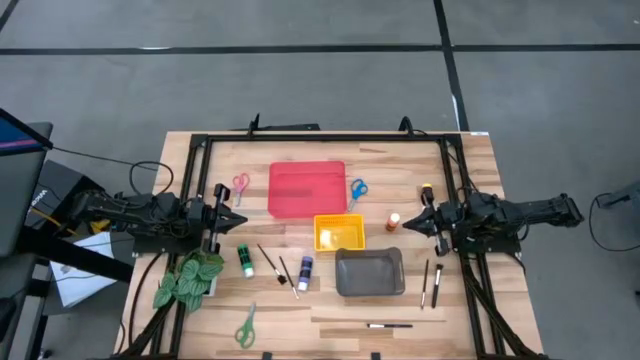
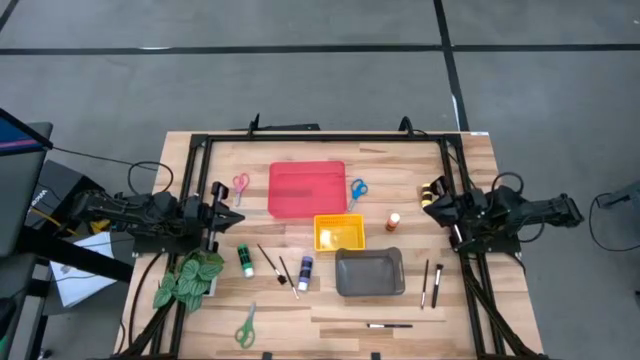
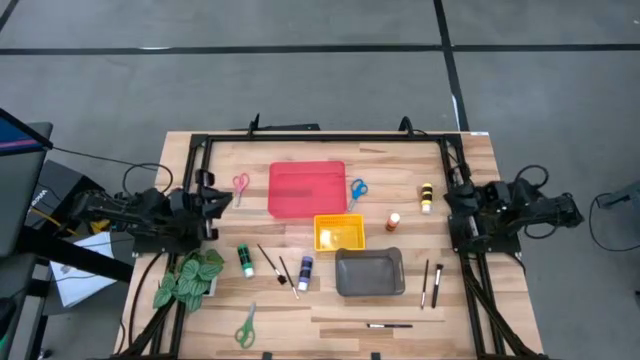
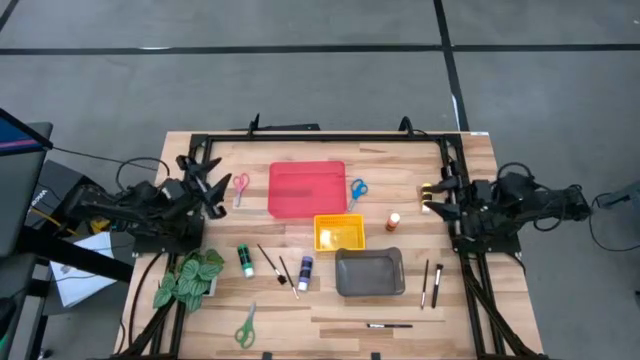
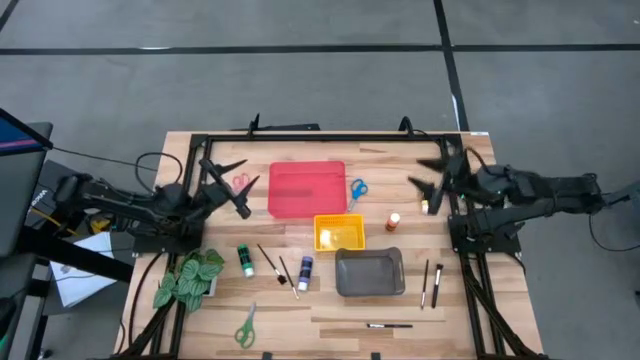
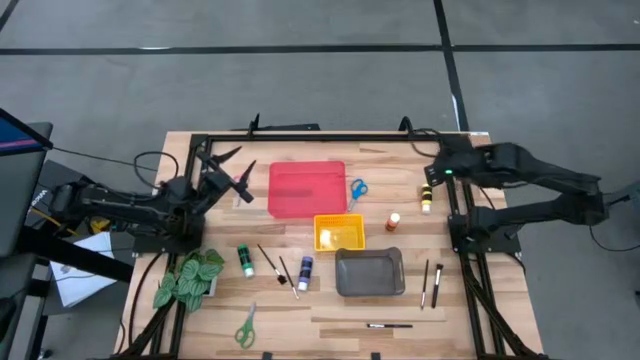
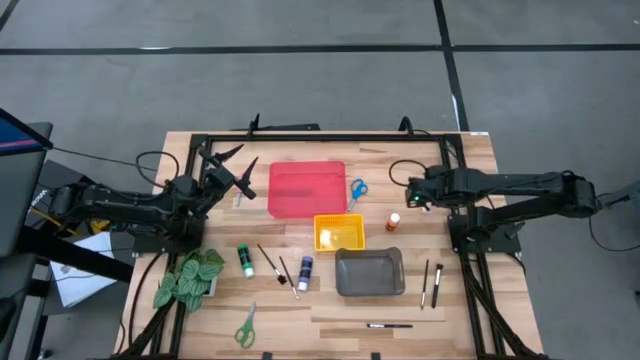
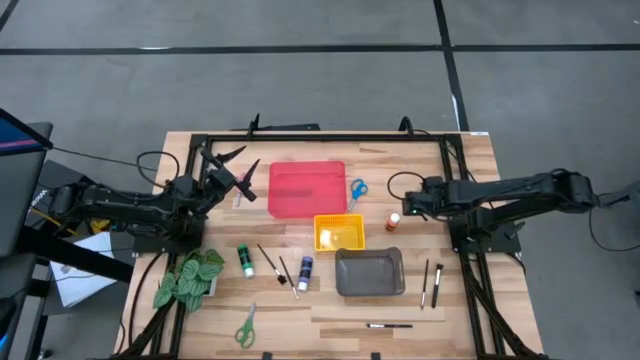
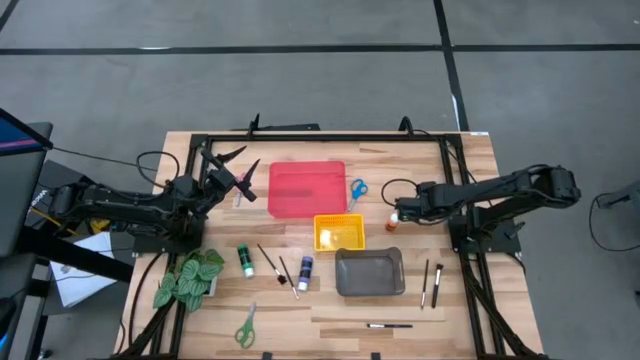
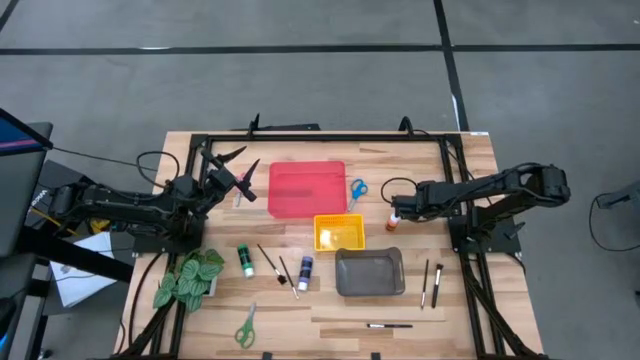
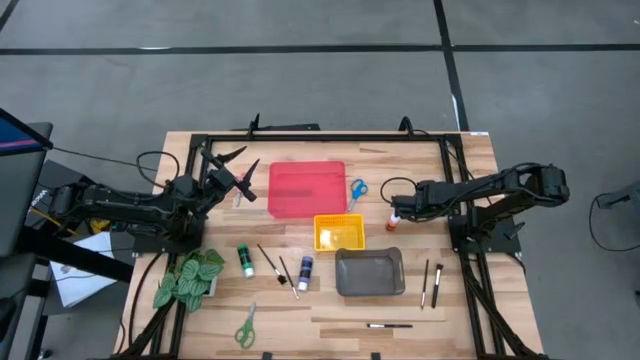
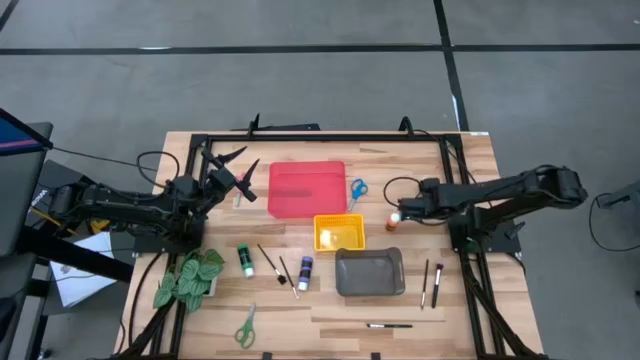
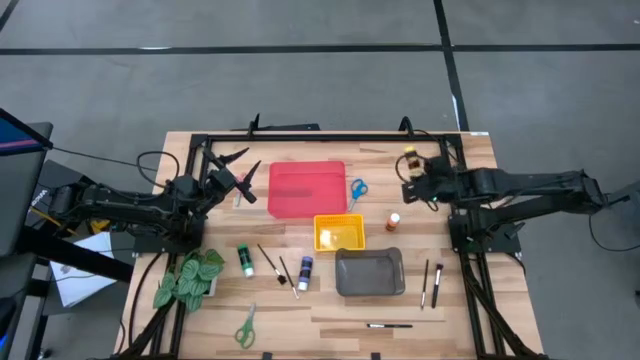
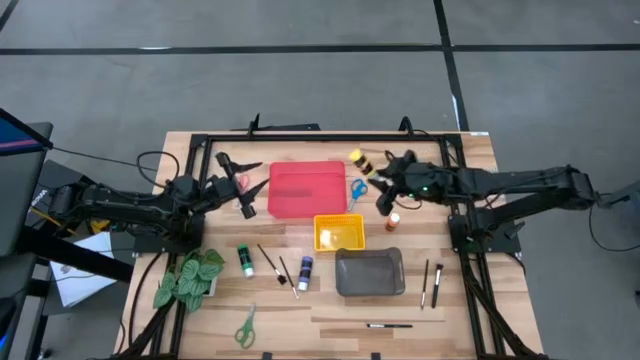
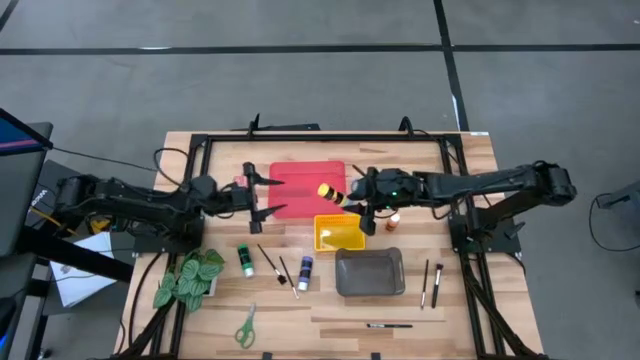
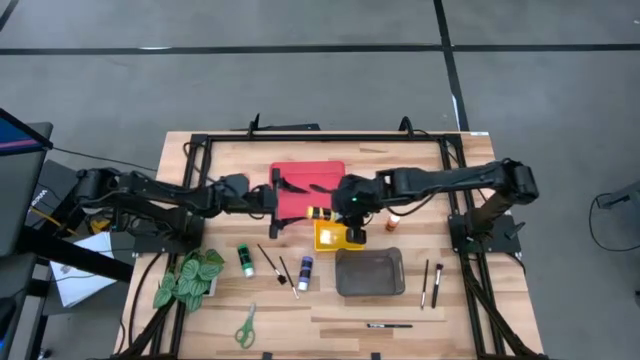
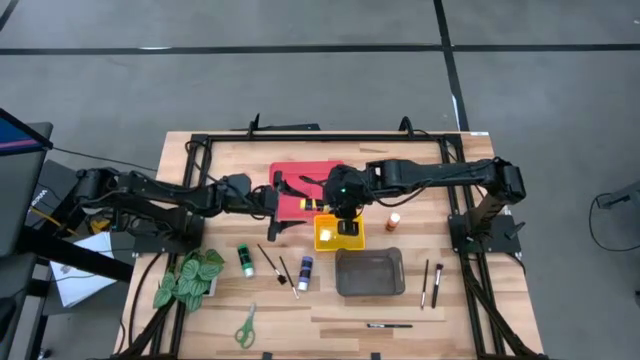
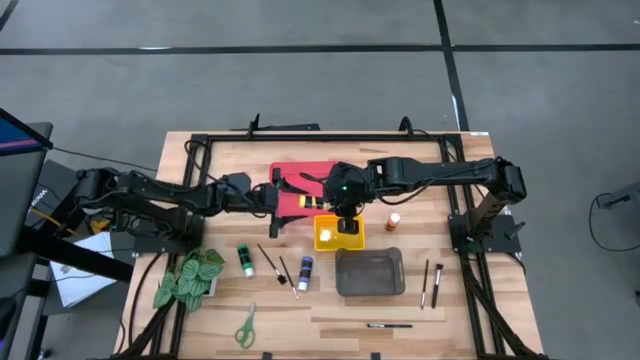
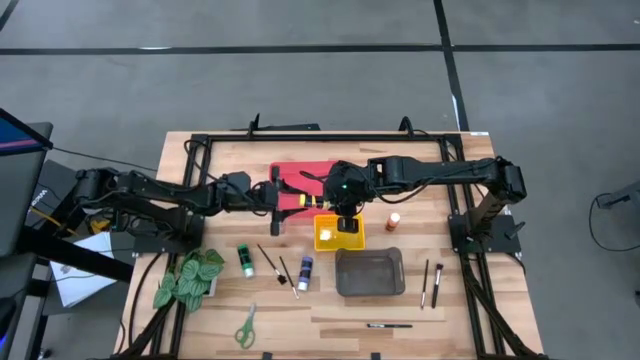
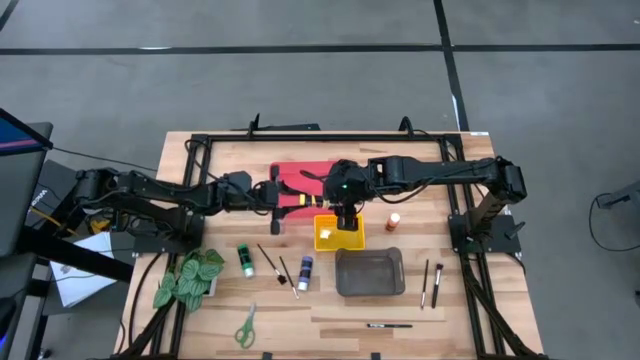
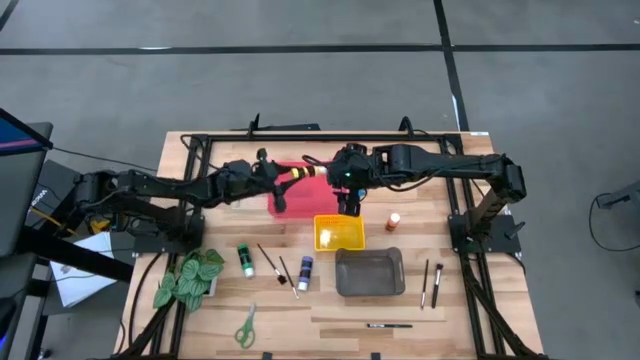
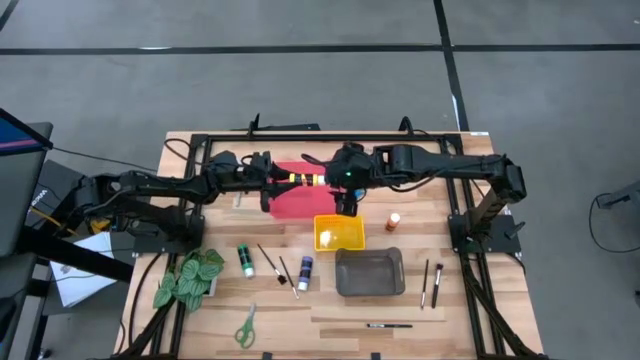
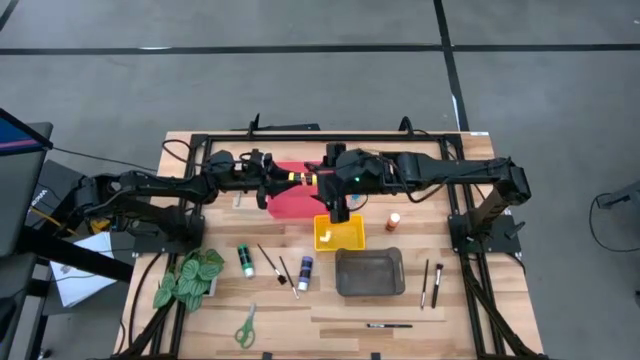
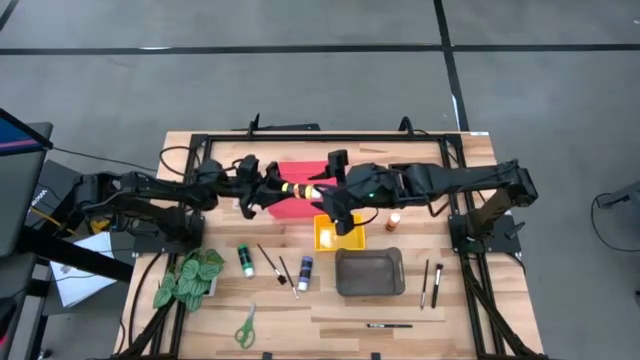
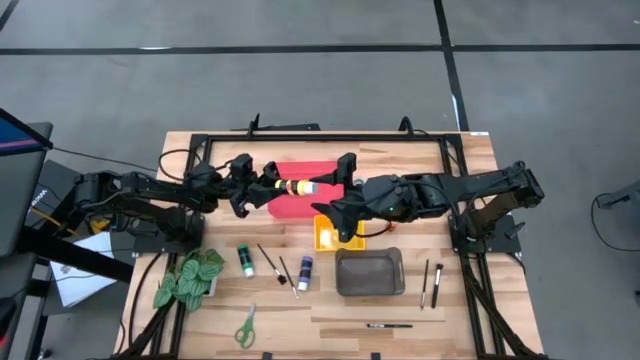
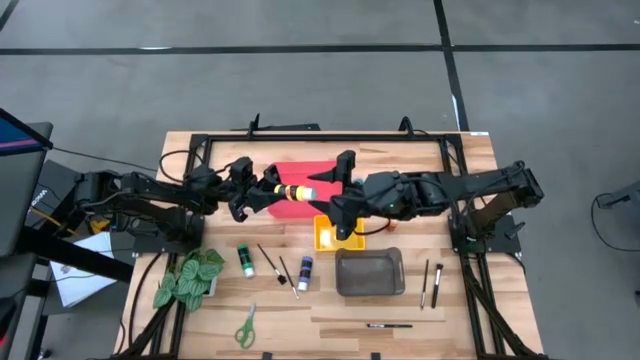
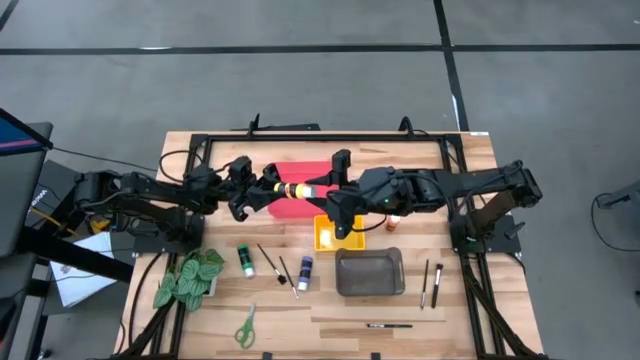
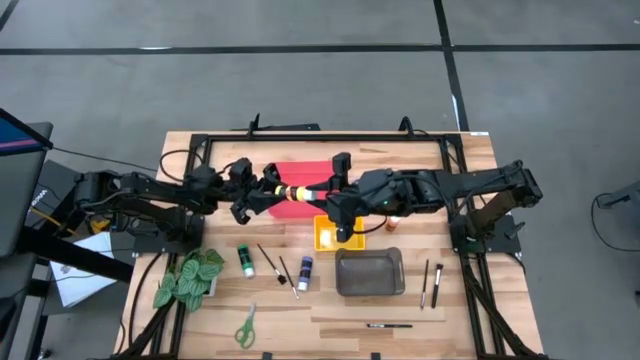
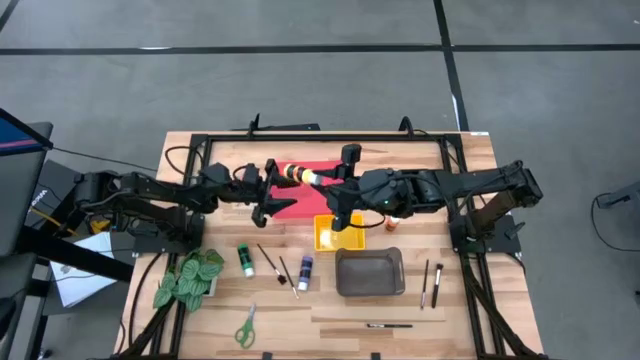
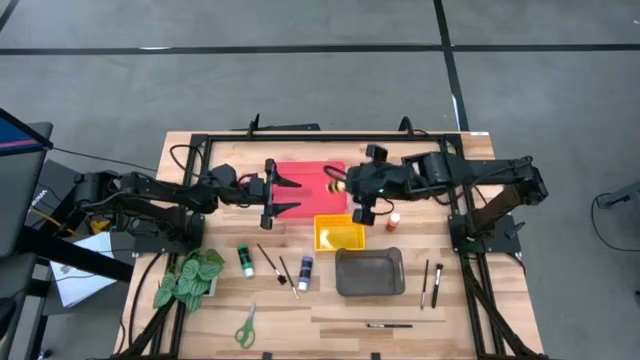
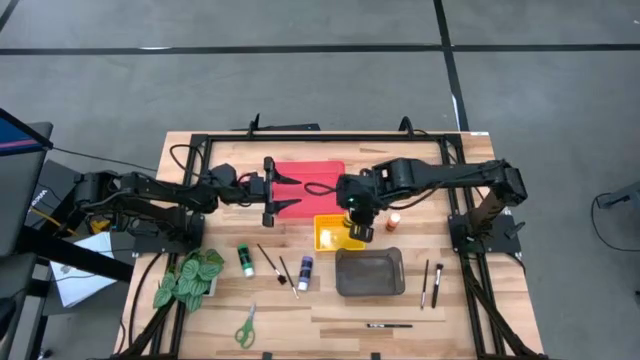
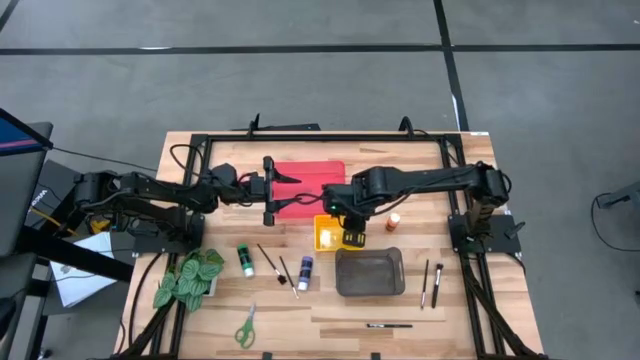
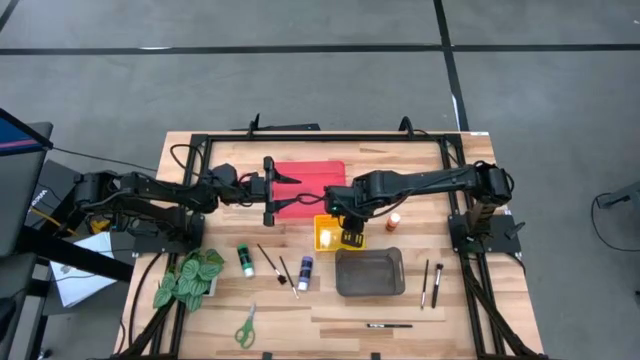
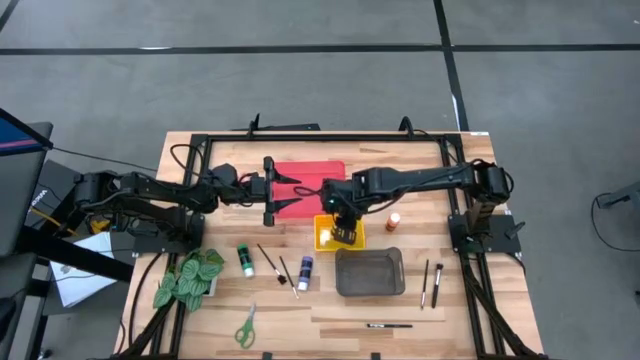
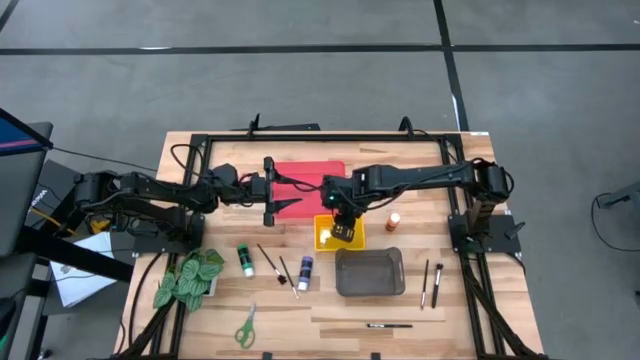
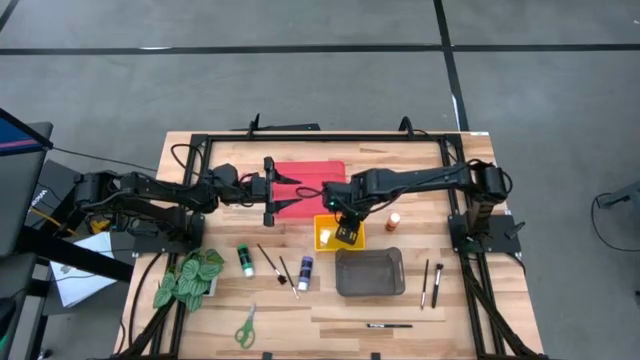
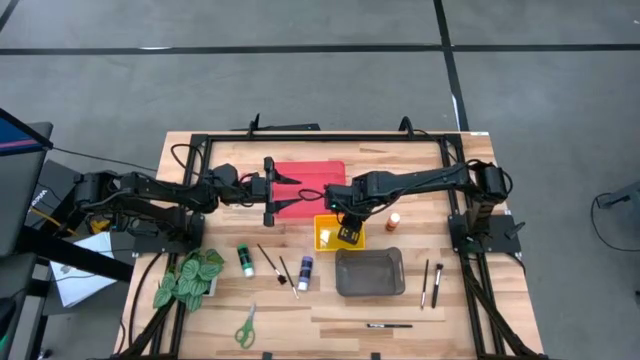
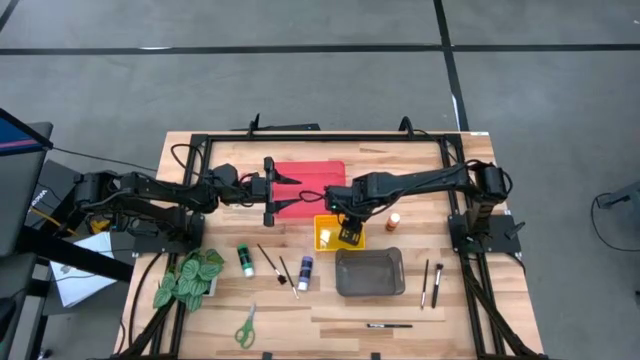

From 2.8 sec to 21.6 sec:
Task: Pick & Place Paint Supplies
Put the yellow paint bottle into the yellow bin
